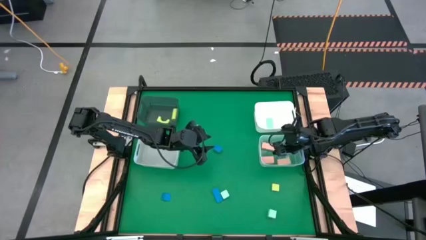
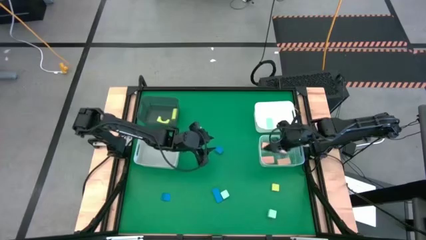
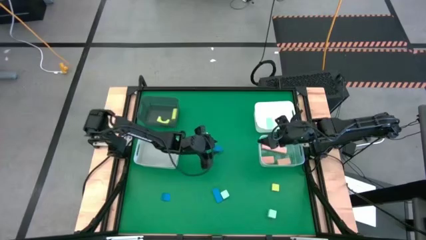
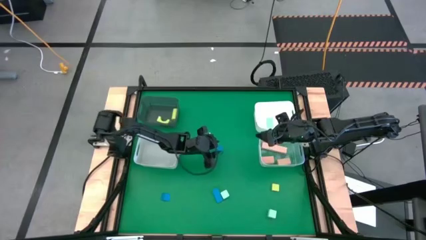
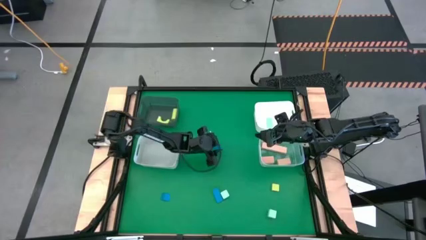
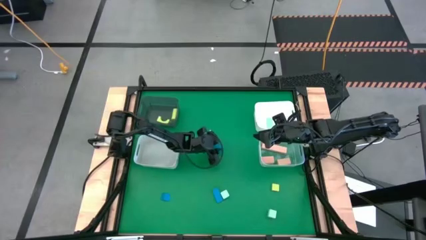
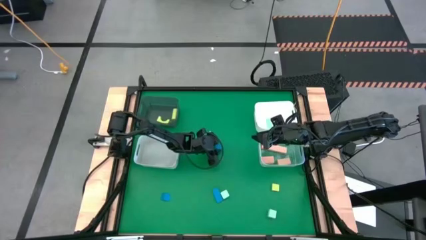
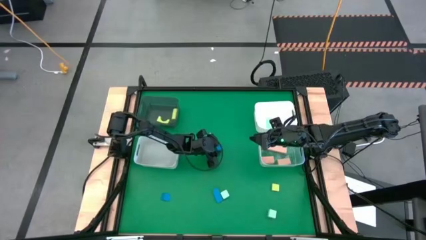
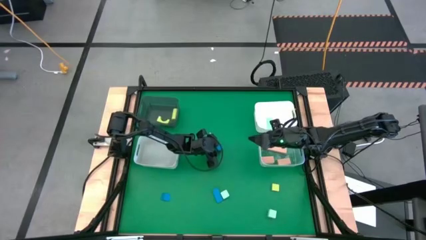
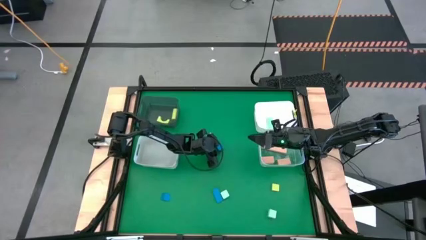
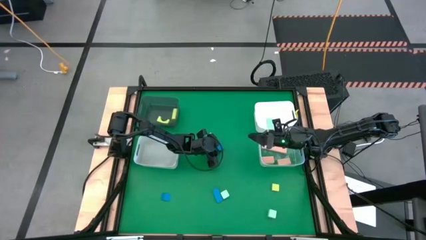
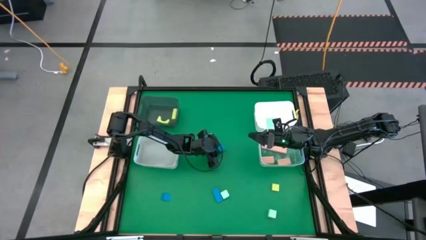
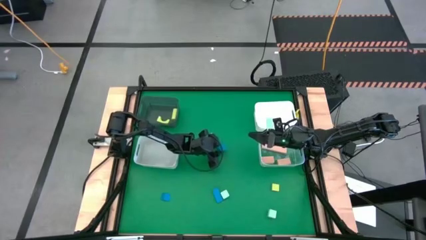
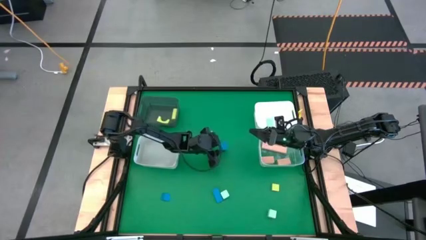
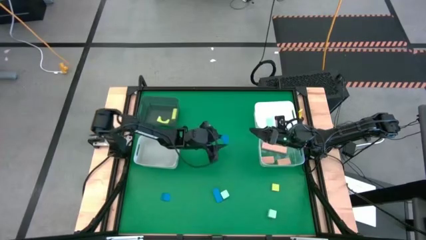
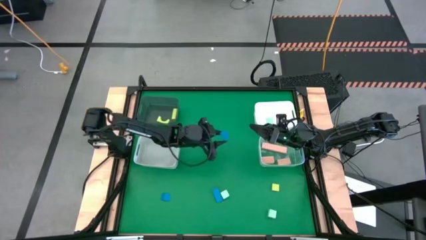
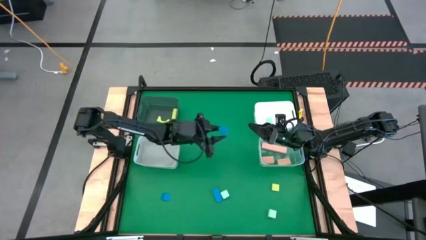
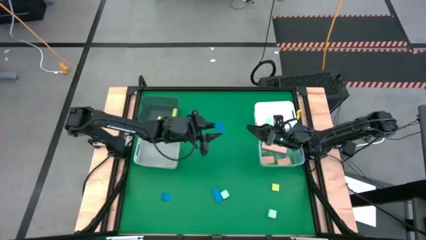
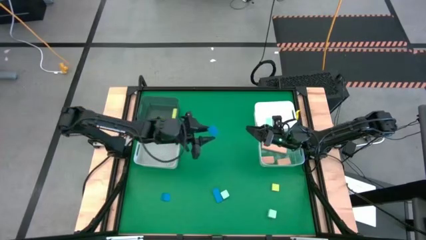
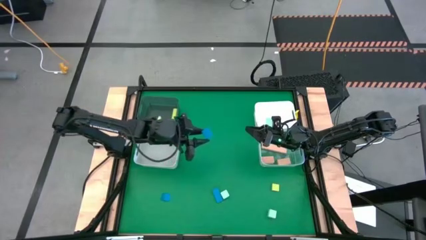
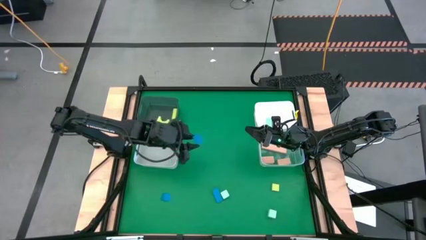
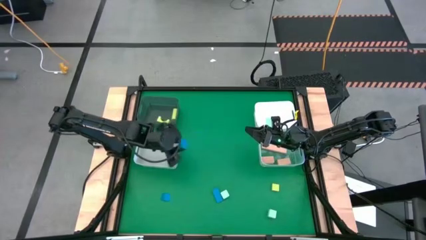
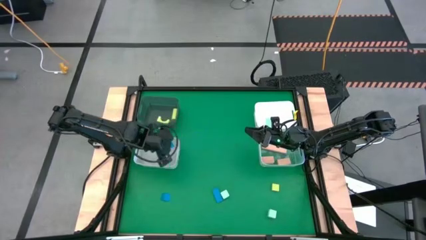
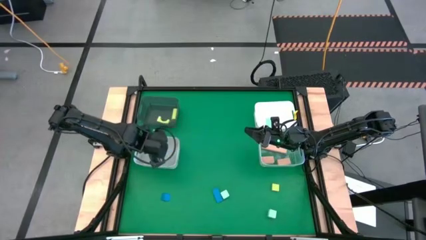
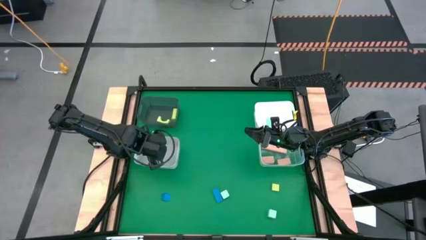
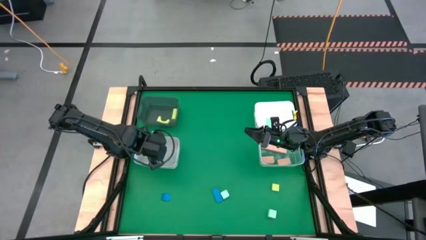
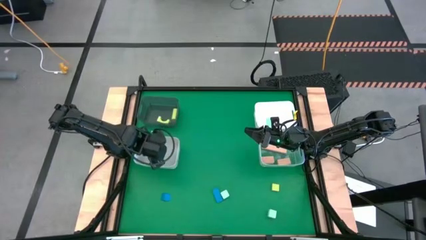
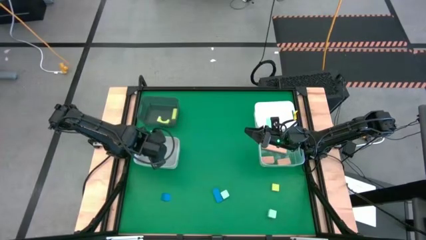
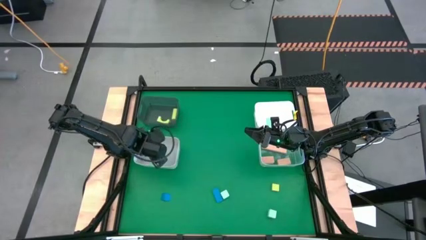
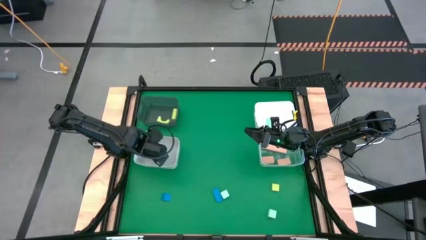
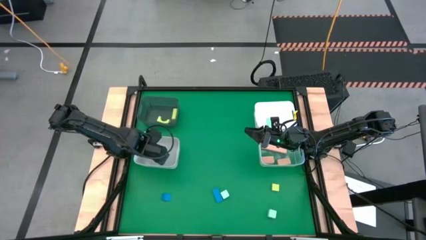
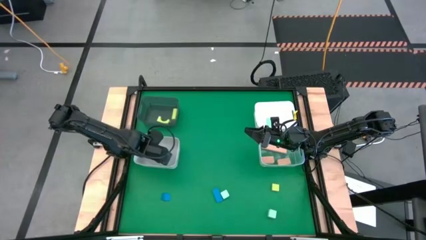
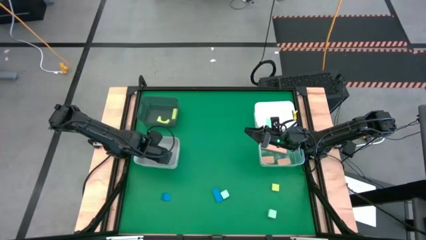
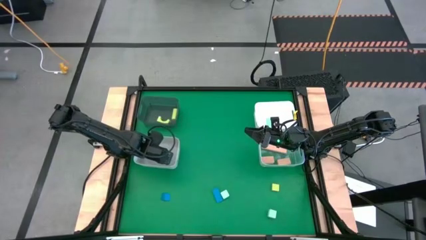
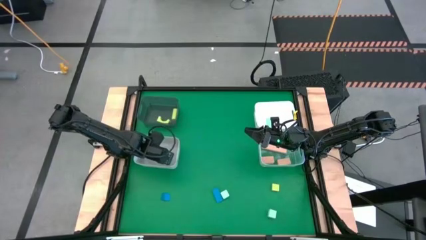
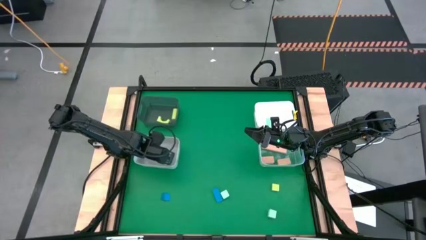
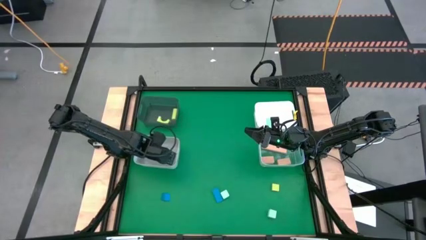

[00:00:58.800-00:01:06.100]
Task: Sort & place blocks by color
Put the blue half circle block into the gray bin

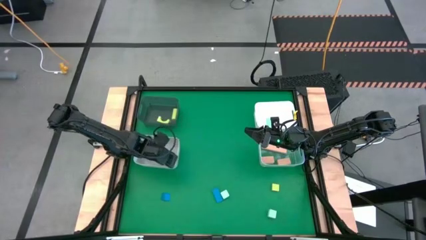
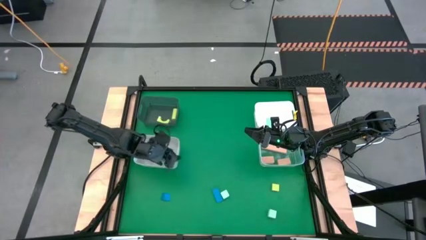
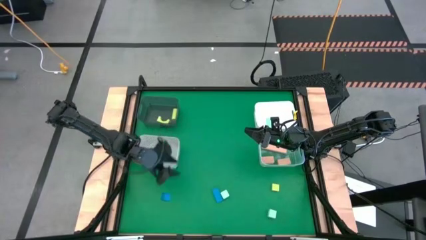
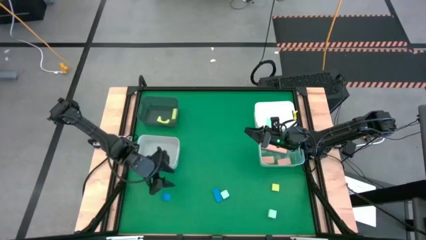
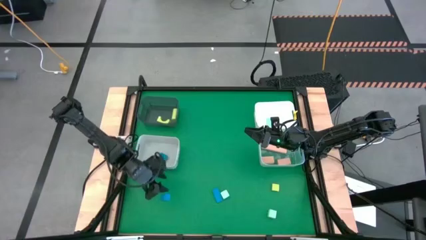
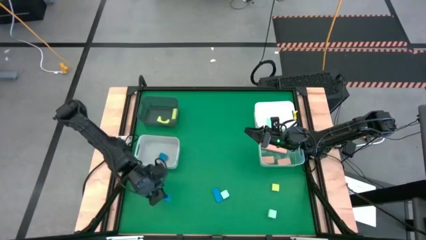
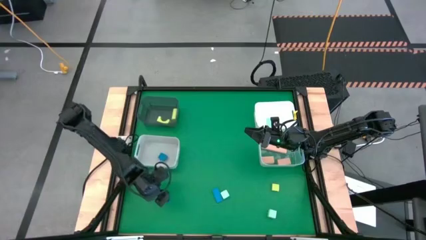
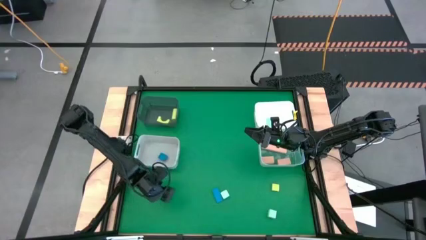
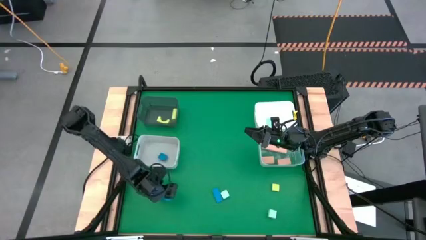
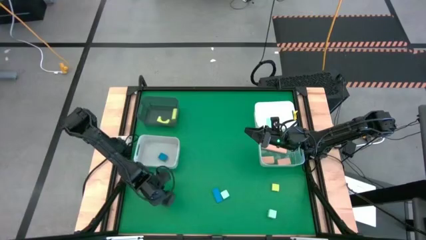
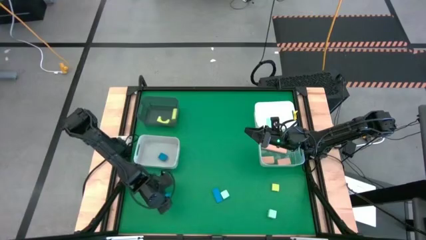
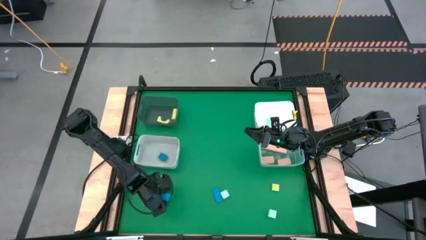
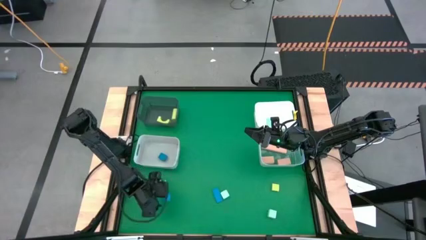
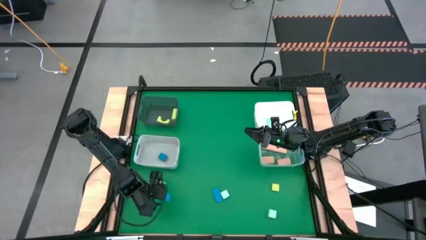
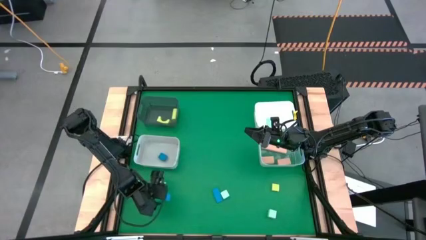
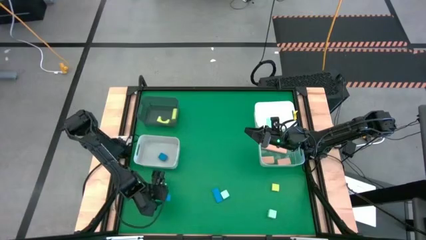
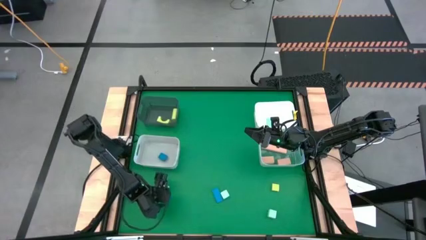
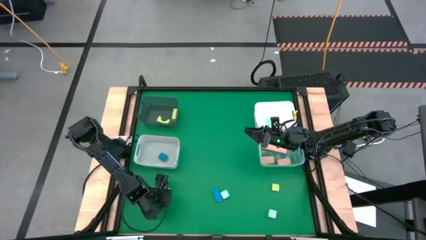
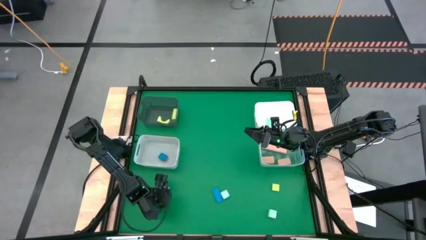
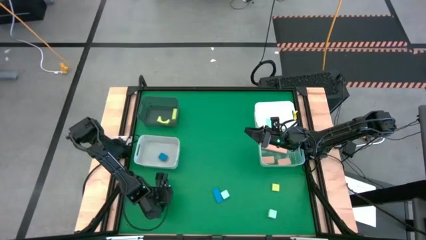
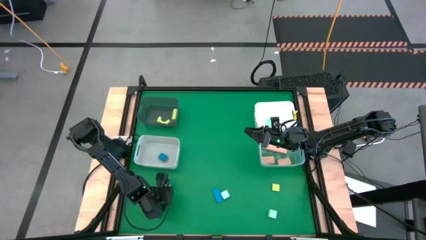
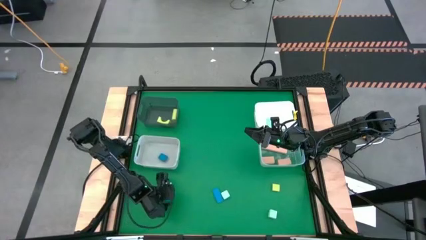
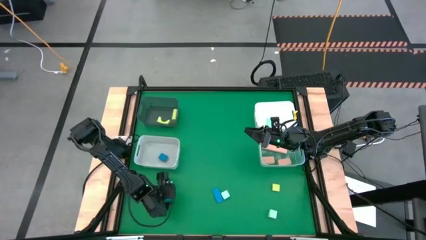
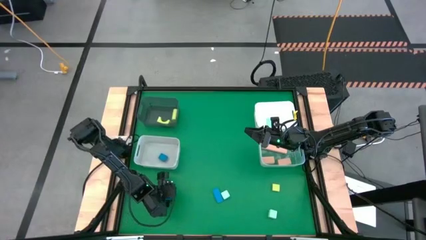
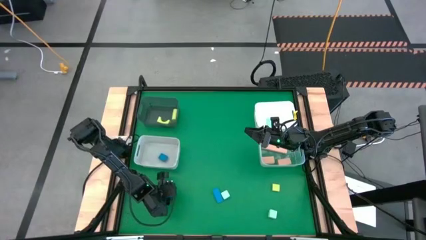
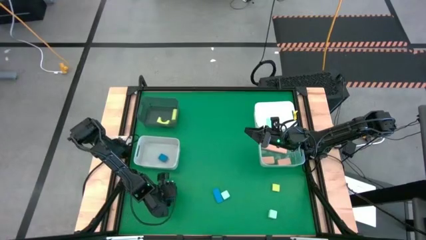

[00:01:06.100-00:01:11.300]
Put the blue triangular block into the gray bin

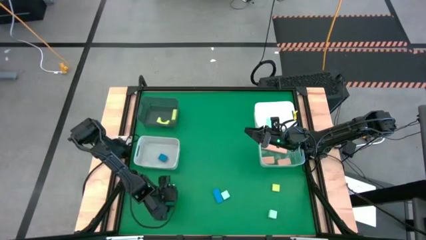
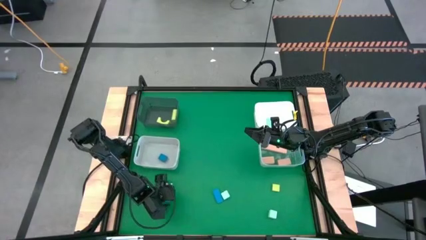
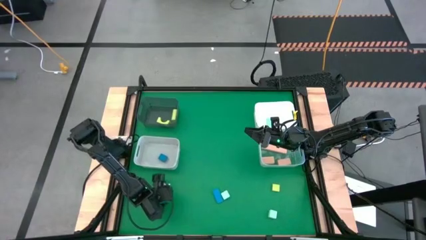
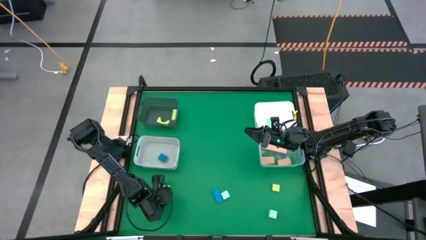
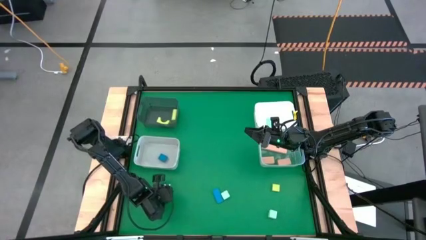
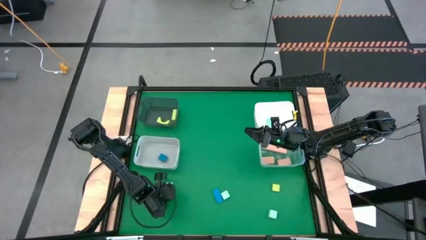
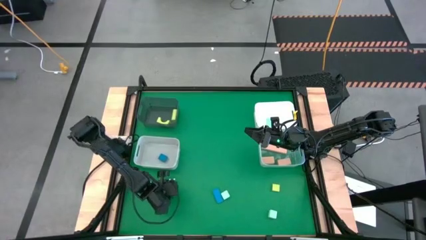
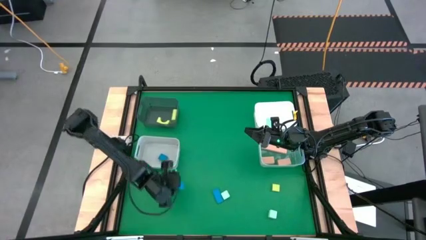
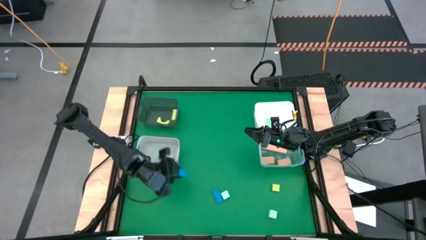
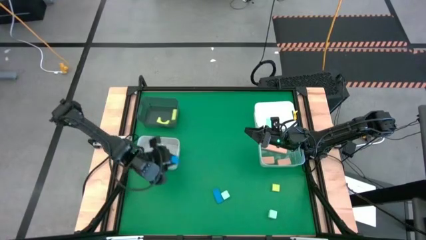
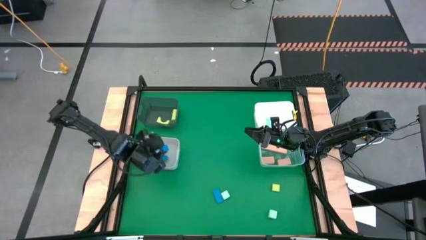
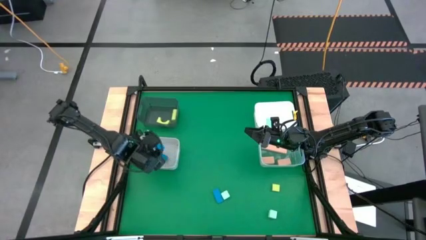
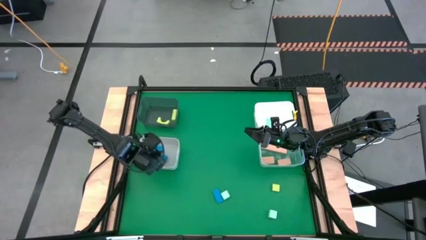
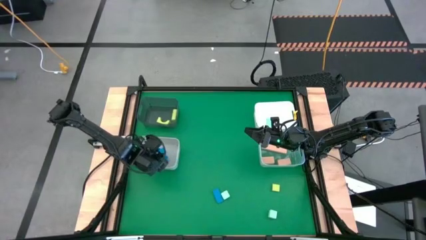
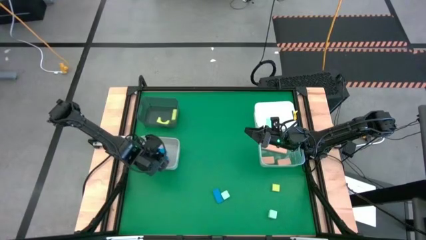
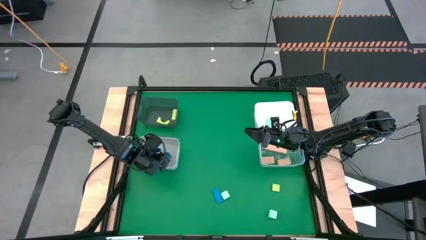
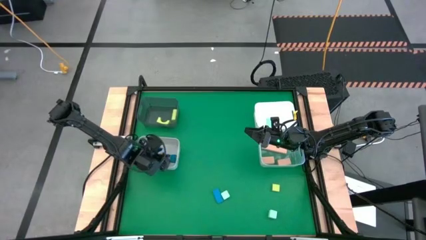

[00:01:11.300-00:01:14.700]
Put the blue triangular block into the gray bin
